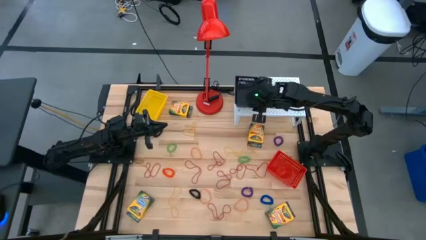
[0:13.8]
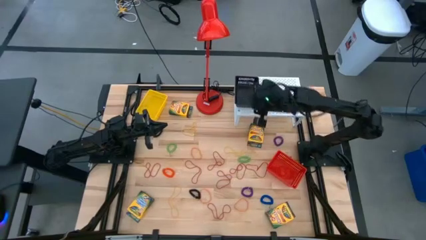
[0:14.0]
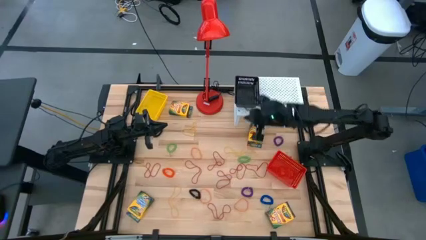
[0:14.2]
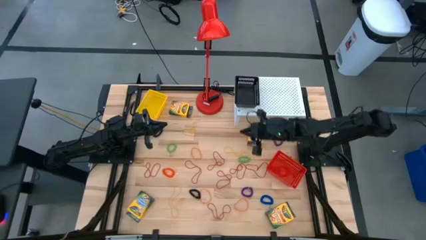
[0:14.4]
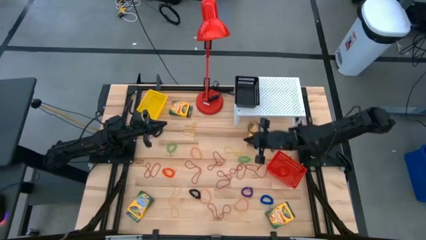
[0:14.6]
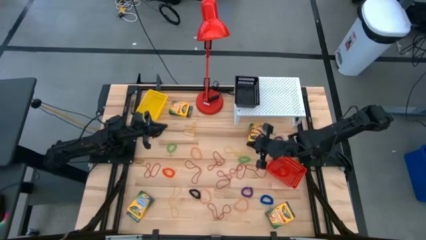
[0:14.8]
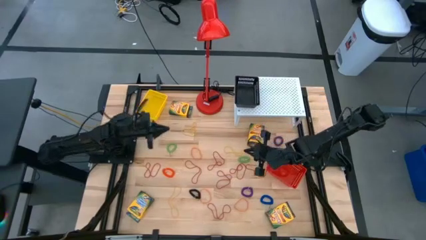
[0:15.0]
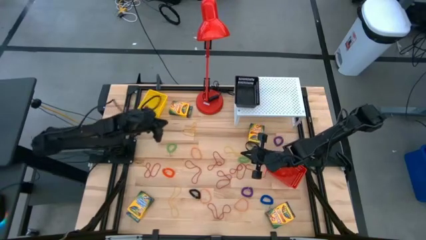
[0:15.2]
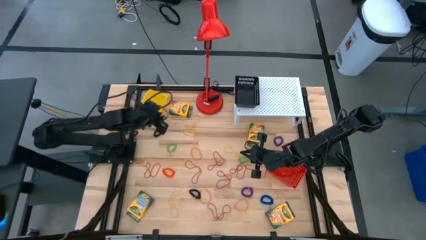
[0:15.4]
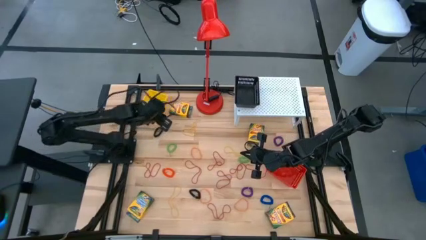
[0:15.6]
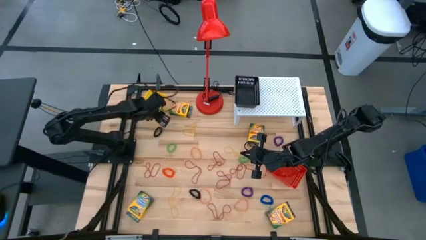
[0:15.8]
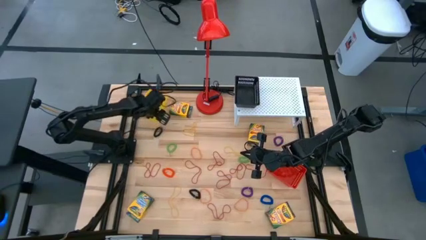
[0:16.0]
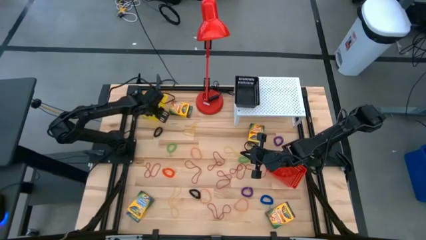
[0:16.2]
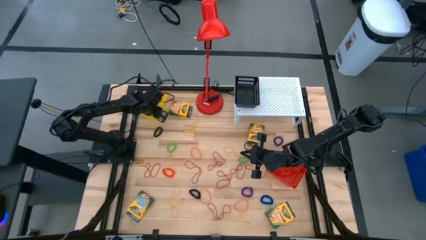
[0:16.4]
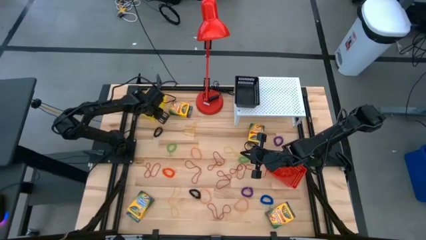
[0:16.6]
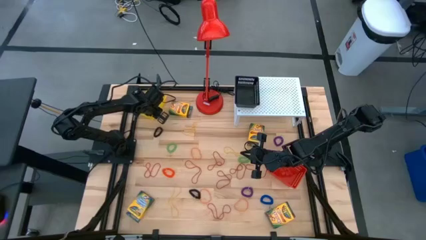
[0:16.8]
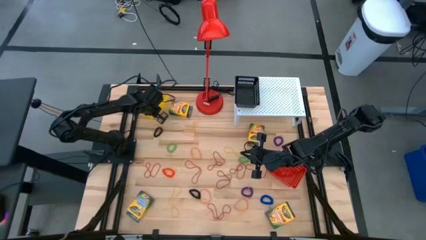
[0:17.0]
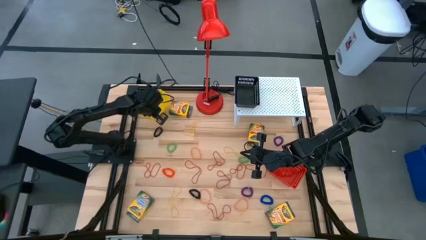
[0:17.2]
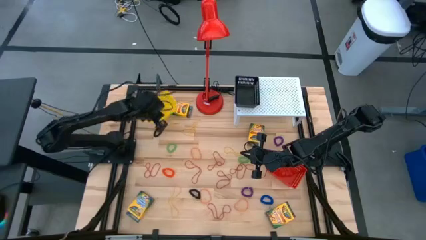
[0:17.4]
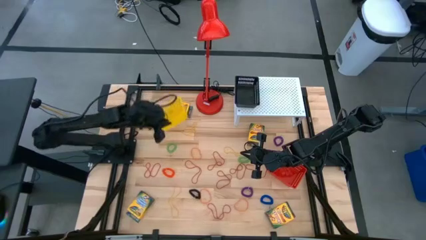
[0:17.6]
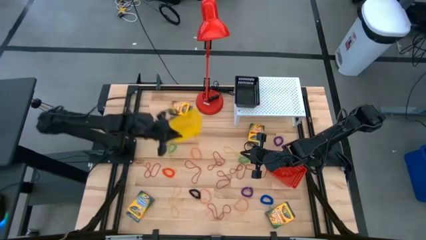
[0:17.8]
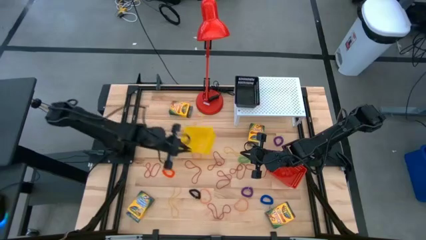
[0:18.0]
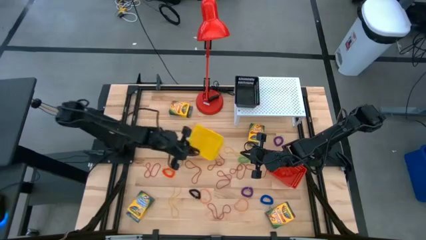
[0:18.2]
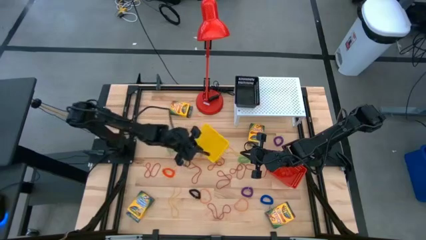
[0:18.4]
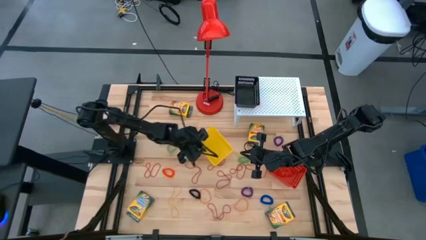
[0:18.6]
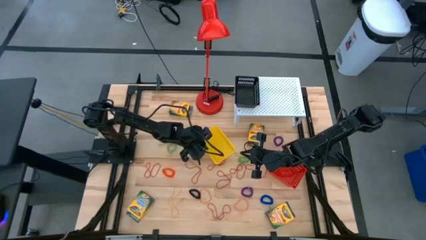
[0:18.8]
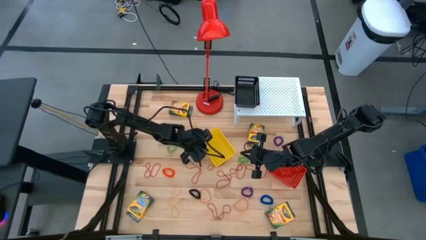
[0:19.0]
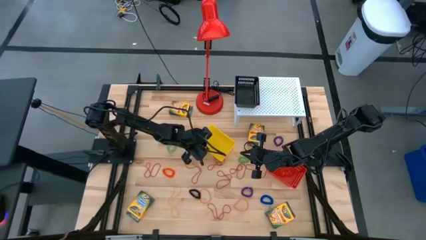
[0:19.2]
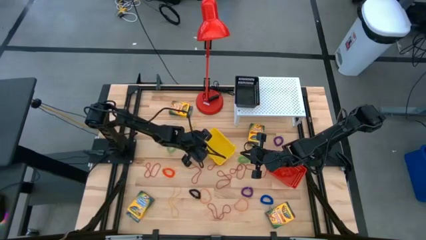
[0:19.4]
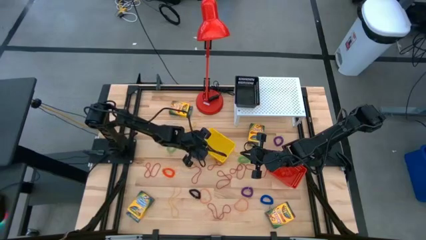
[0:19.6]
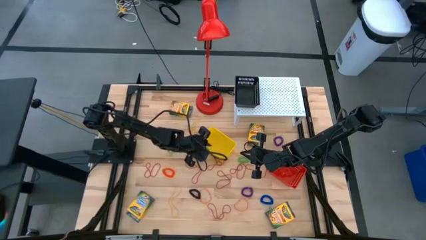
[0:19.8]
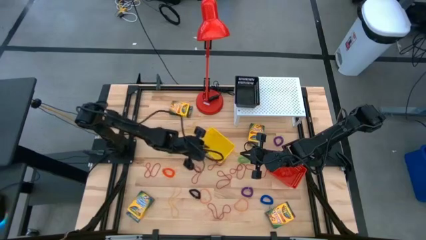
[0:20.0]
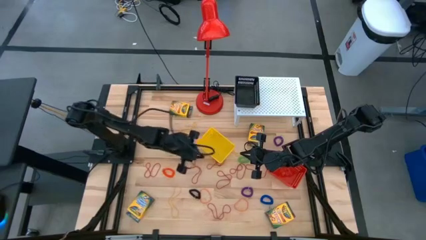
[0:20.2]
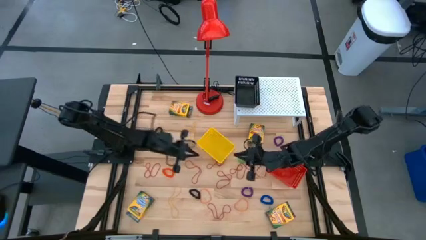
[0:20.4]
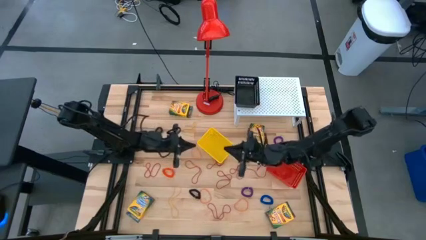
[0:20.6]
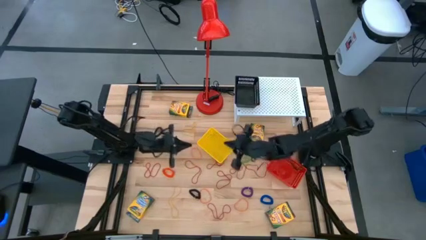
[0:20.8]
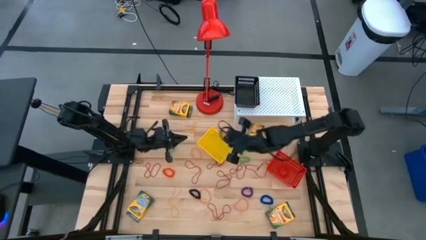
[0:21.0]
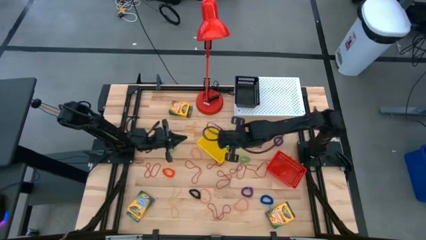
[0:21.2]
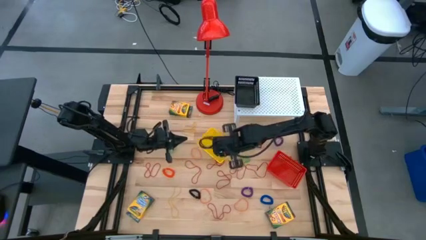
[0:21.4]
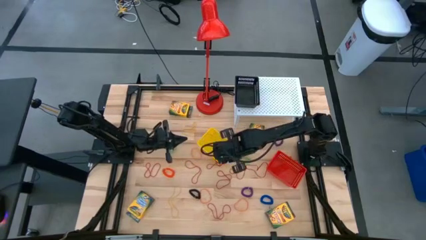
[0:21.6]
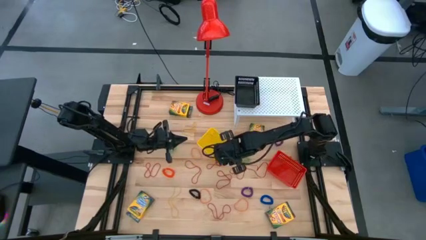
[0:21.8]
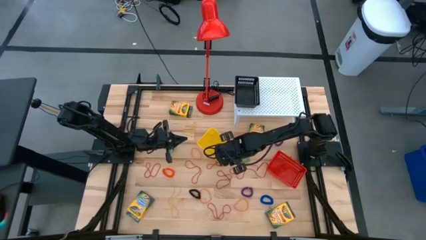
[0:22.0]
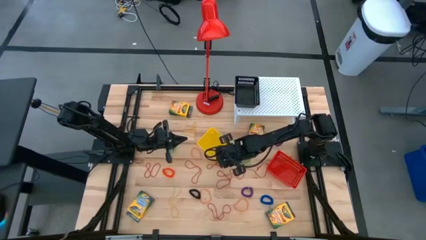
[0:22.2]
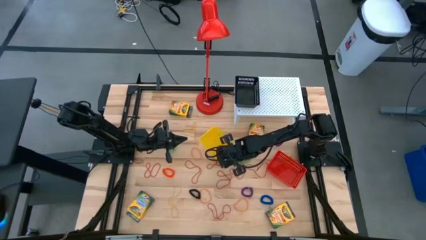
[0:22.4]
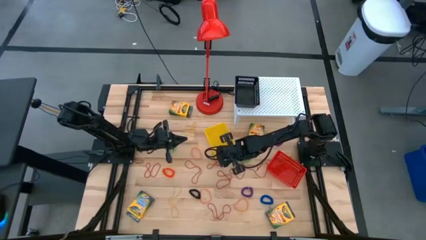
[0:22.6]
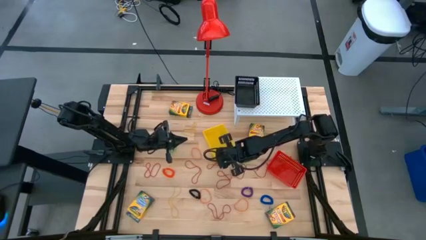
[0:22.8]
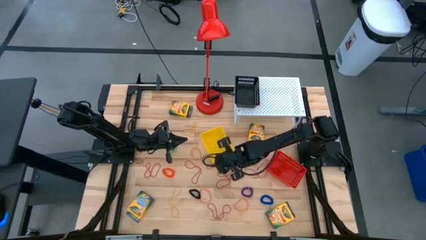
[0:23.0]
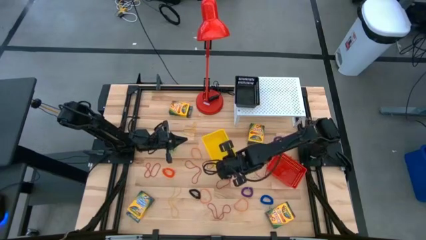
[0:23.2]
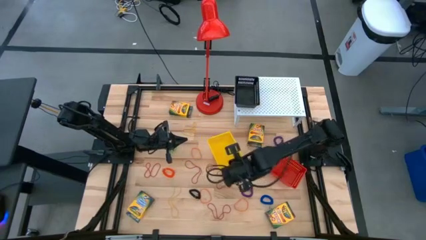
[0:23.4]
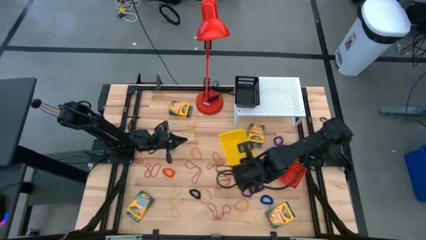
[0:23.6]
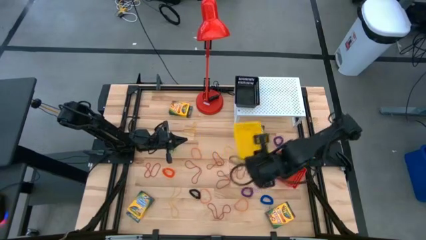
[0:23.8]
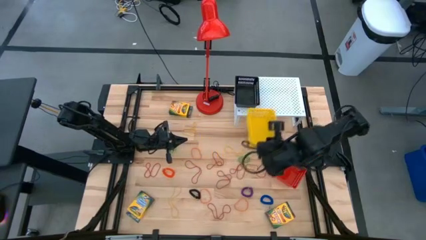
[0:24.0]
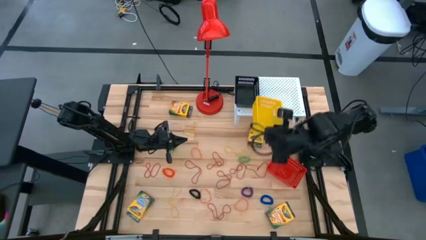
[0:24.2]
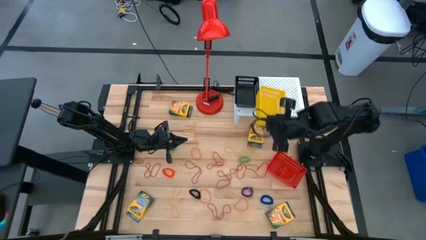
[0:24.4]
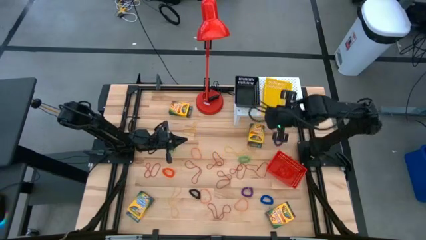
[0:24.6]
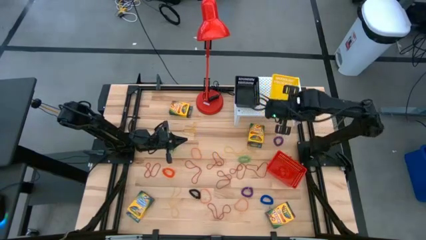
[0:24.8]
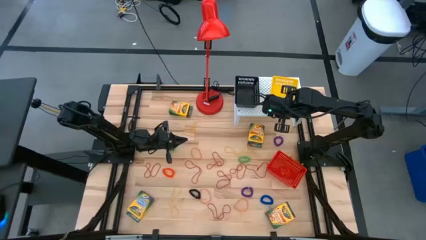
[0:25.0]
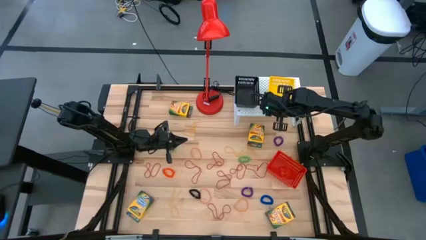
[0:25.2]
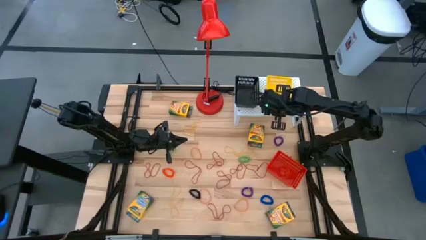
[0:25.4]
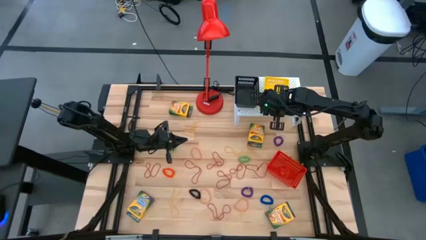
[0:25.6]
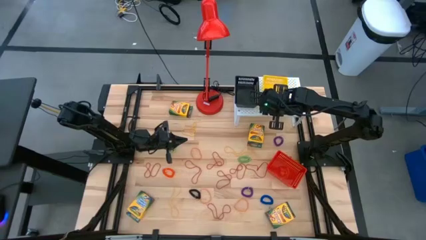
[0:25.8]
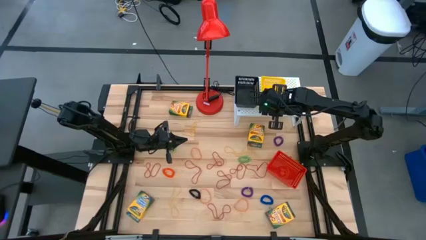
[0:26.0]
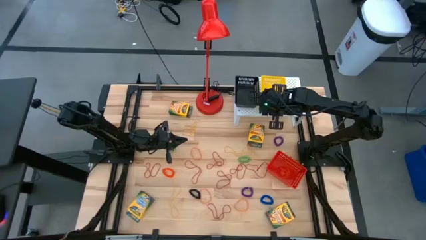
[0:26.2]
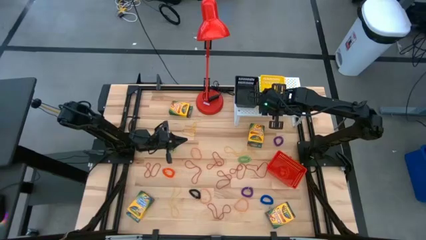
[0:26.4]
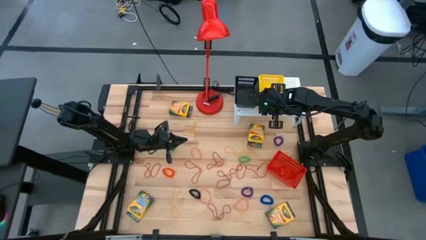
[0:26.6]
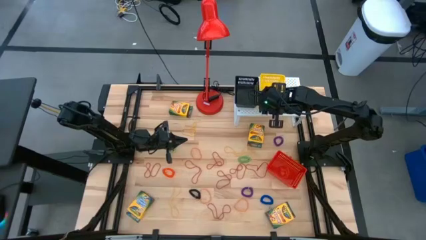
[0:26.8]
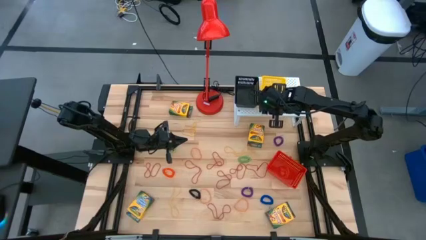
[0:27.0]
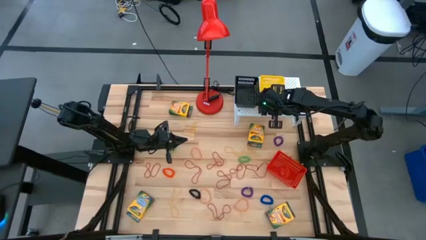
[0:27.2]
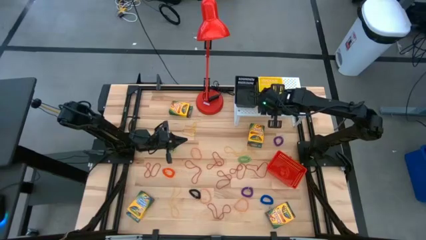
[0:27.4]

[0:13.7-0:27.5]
Task: Pick & Place Office Desk Supplies
Put the yellow bin onto the shelf
